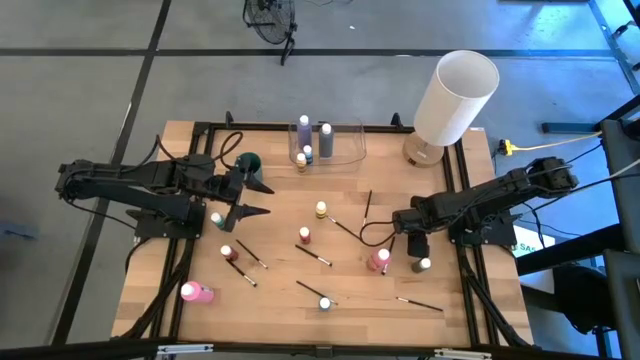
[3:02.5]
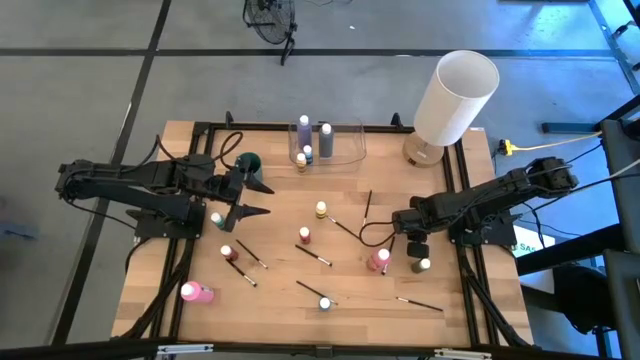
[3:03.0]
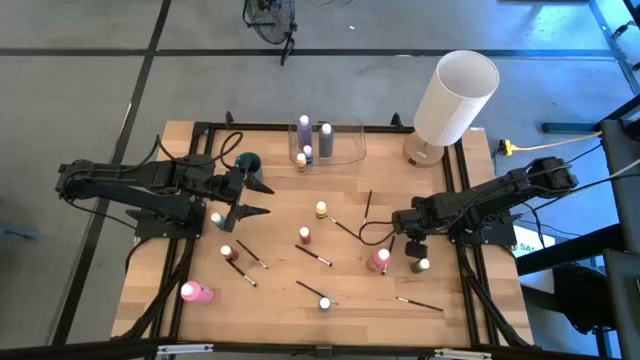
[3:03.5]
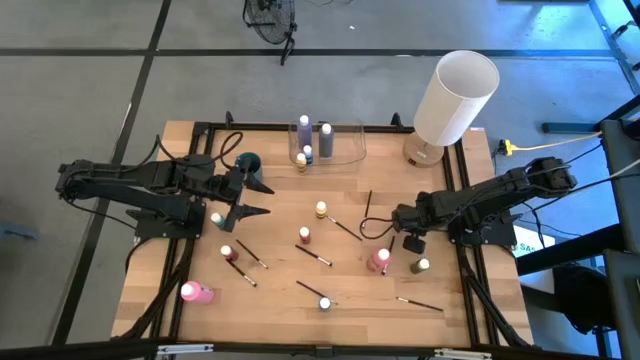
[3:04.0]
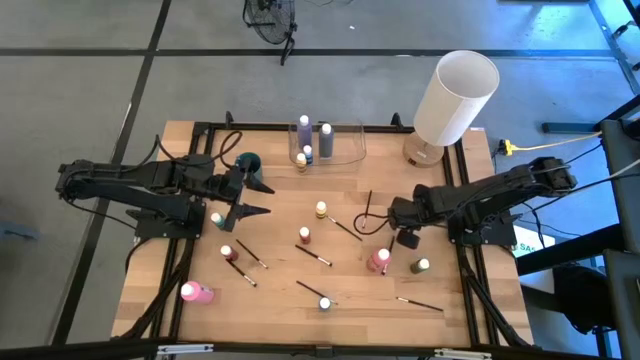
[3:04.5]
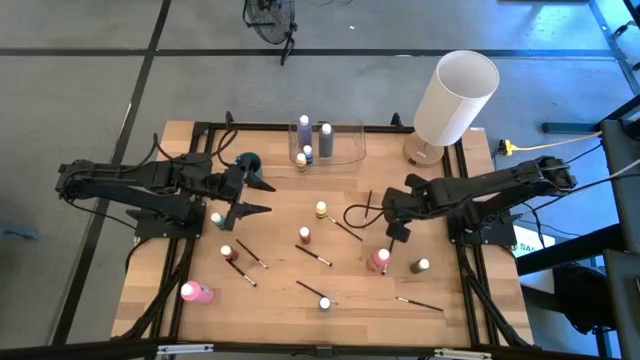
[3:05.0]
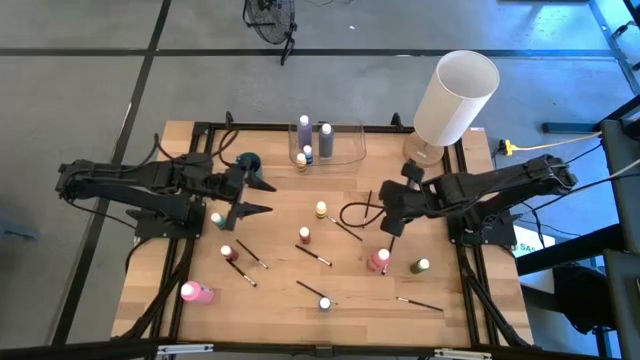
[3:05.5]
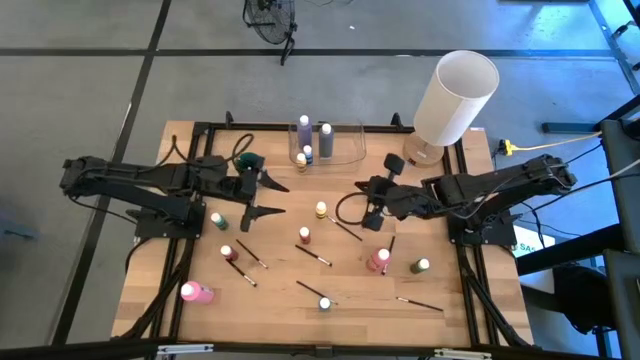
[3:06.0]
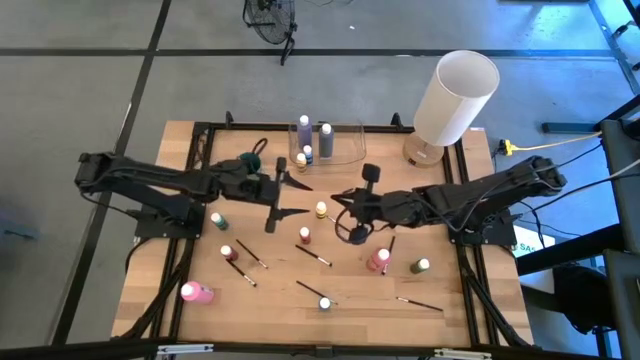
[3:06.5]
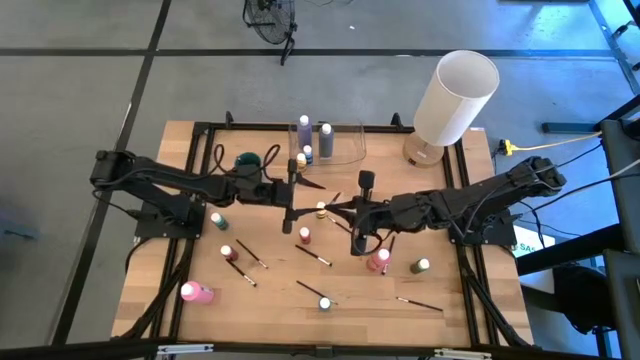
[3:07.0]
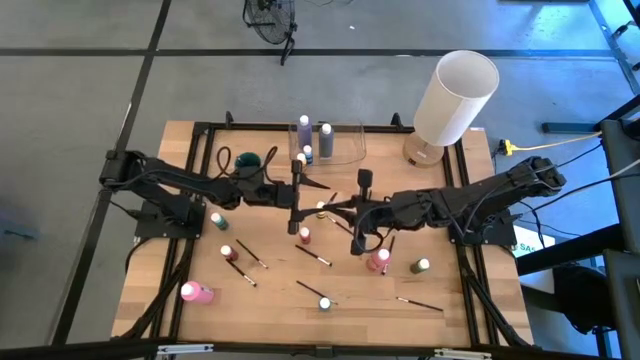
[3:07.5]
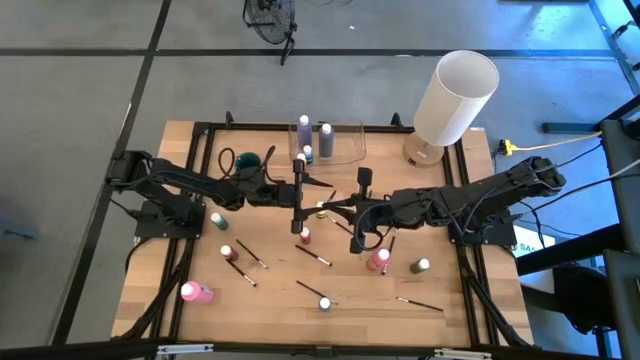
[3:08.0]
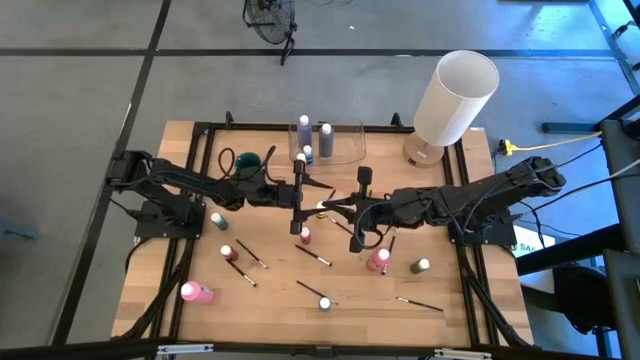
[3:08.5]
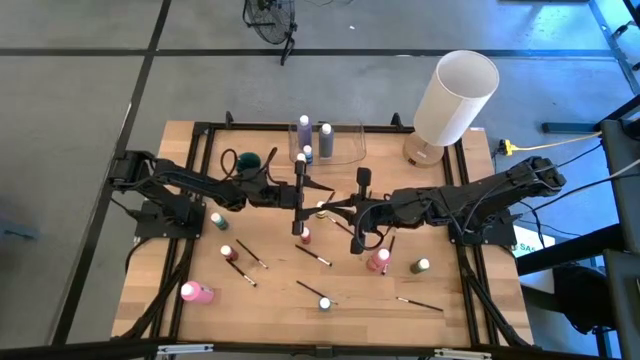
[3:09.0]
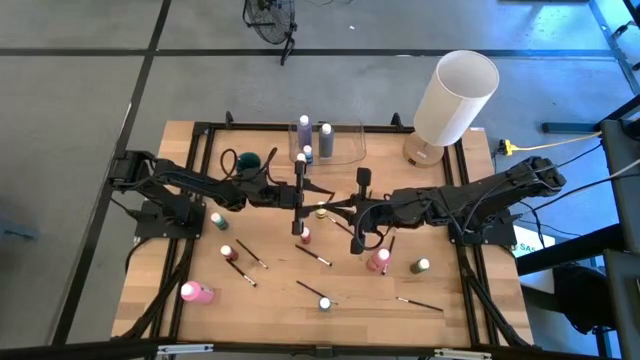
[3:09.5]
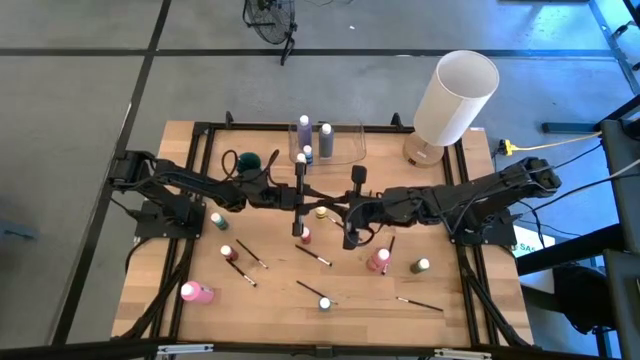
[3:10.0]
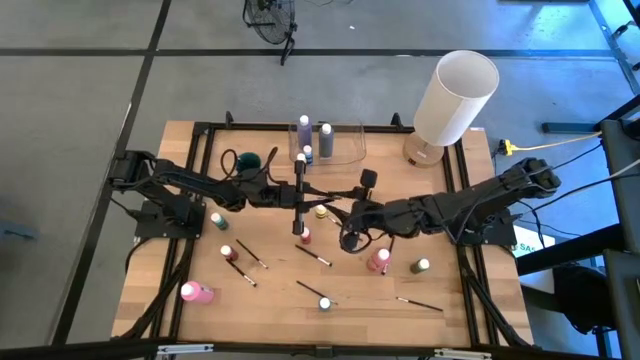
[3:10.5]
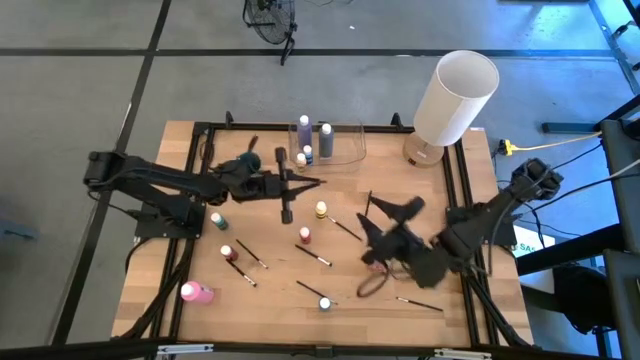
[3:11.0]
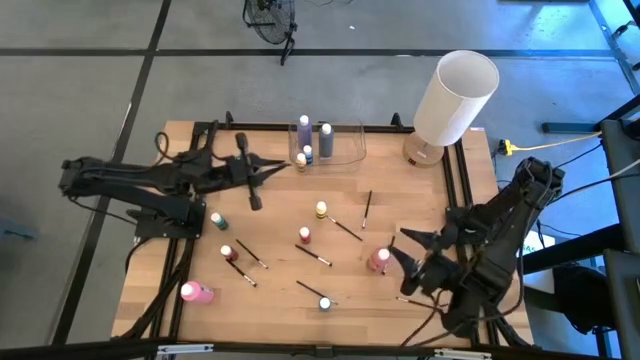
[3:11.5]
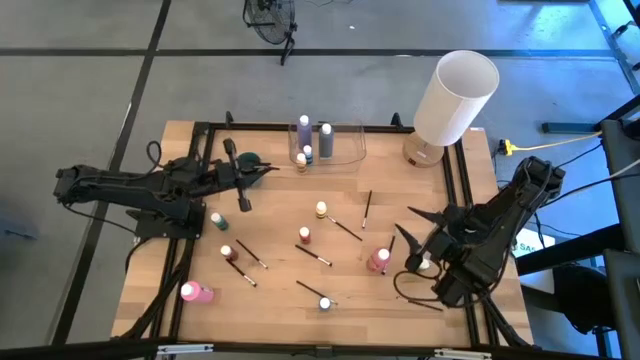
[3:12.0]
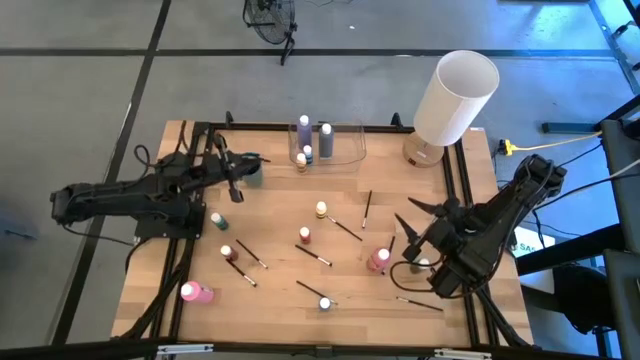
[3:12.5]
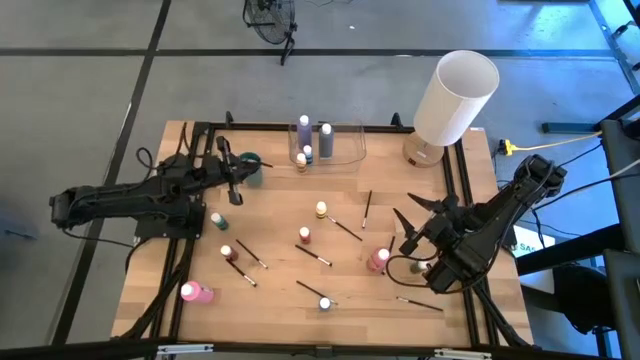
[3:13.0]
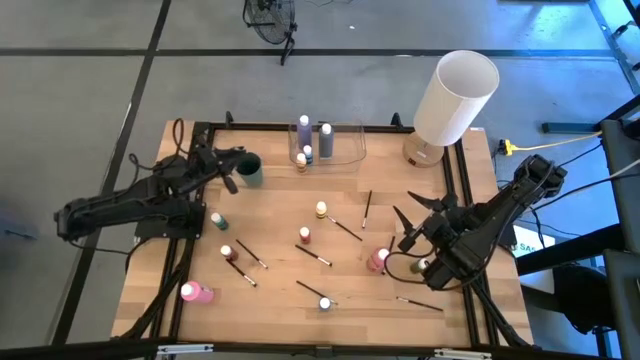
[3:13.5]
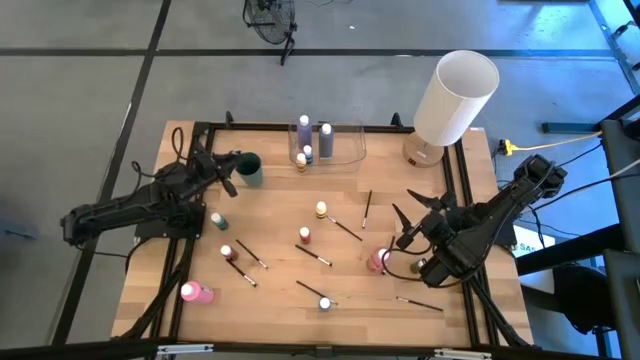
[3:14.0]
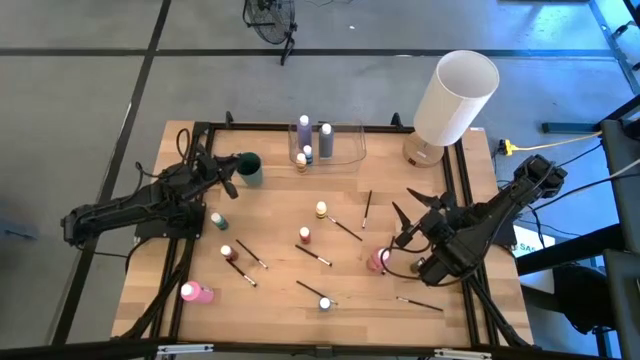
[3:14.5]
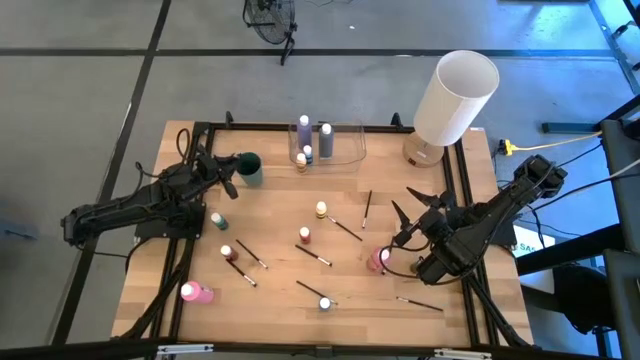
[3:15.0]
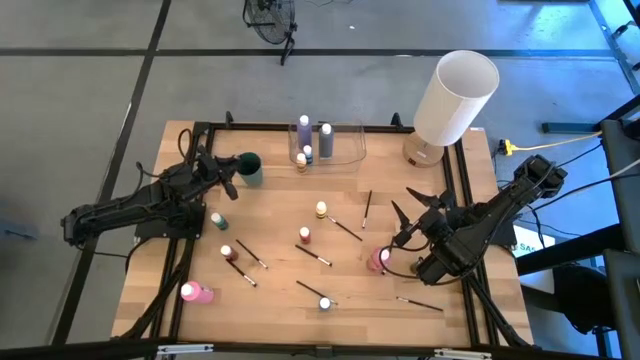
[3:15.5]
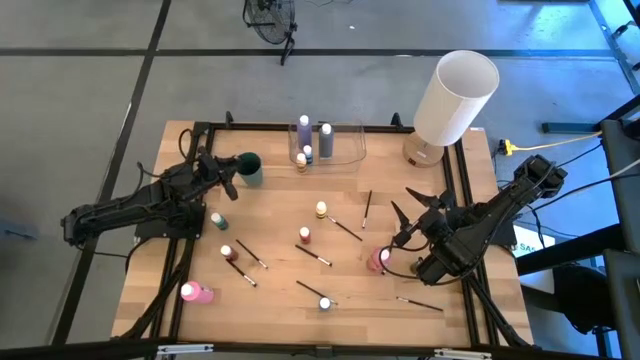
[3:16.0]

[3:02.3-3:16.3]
Task: Pick & Place Paint Supplies
Put the silver paint brush into the green cup

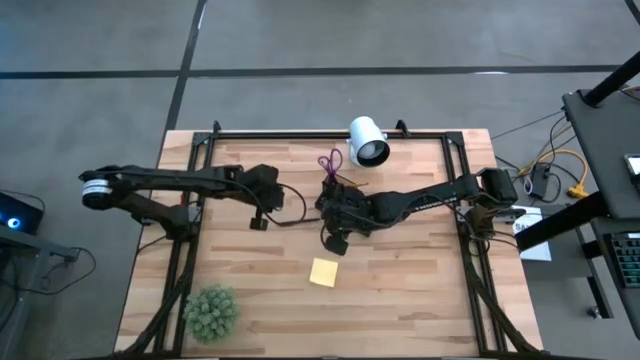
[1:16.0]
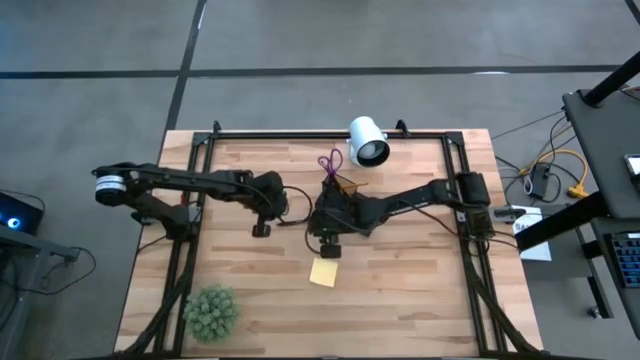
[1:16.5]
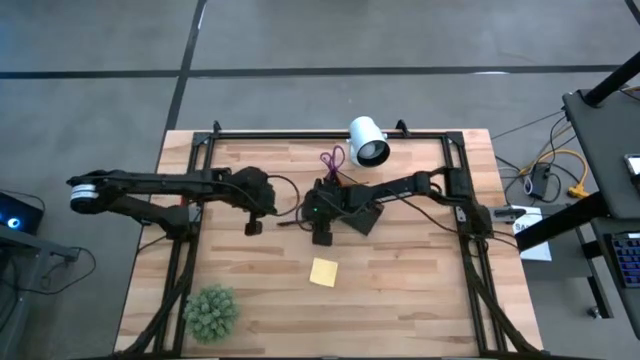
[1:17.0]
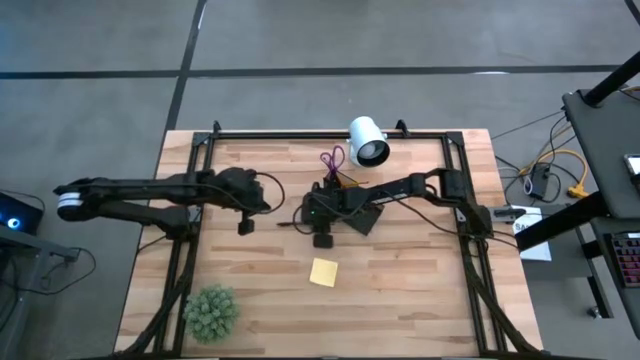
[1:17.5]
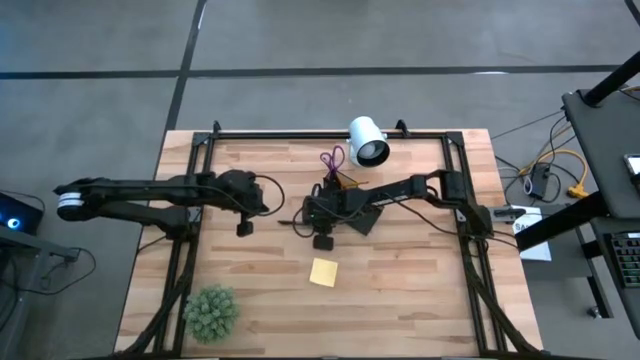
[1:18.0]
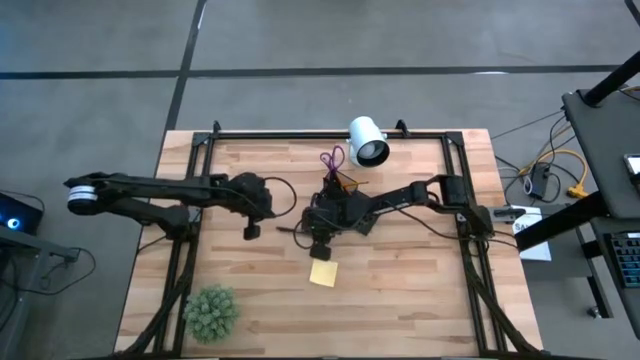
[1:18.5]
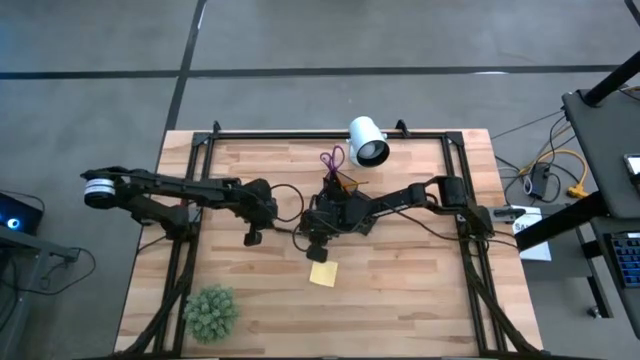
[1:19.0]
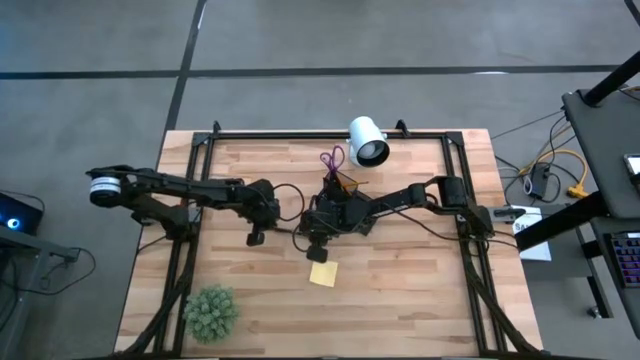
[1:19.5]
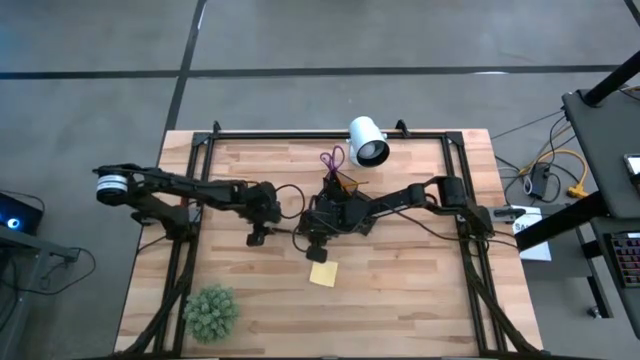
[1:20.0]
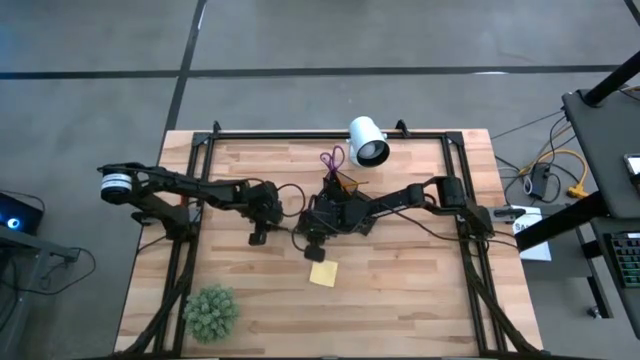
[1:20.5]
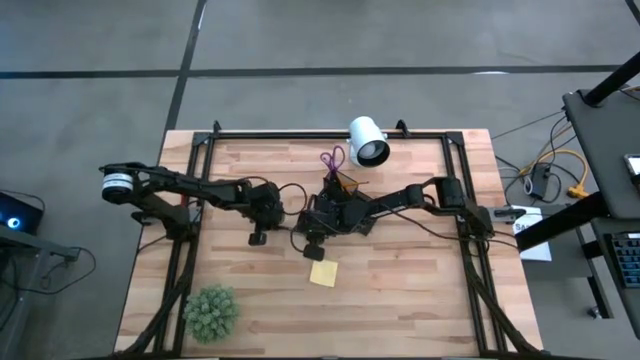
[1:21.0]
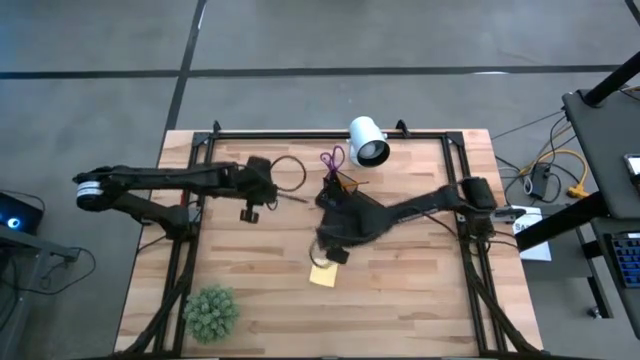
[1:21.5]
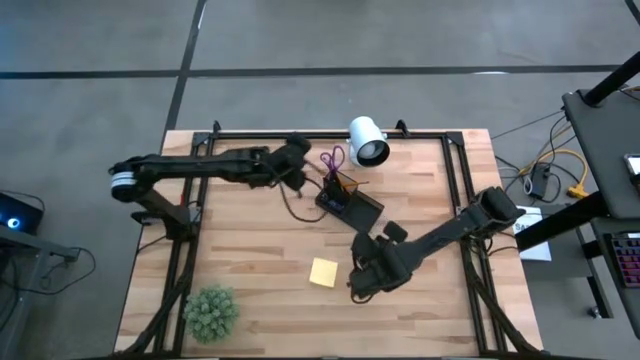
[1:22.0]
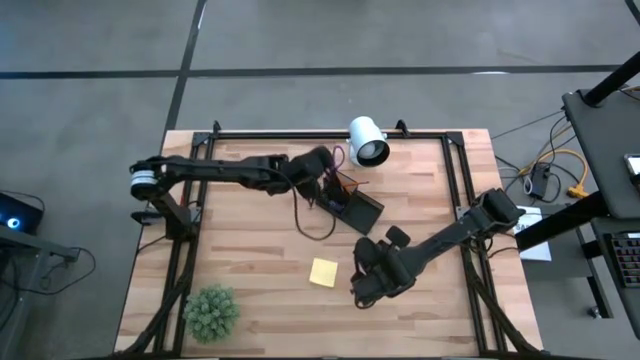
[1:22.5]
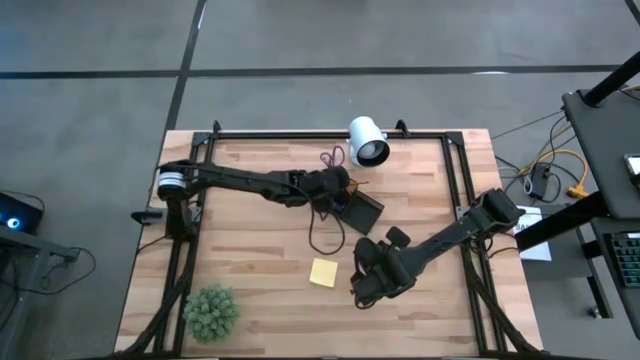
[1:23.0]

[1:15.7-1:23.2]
Task: Pick and place office supplies into organizer
Put the black pen into the black mesh organizer
